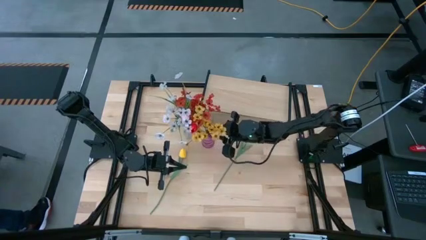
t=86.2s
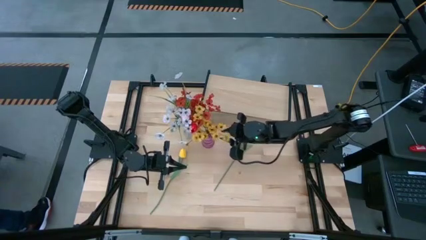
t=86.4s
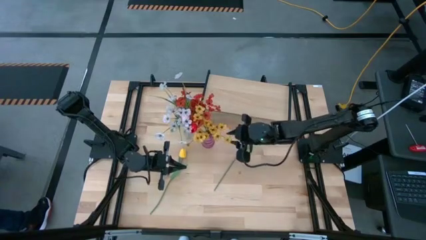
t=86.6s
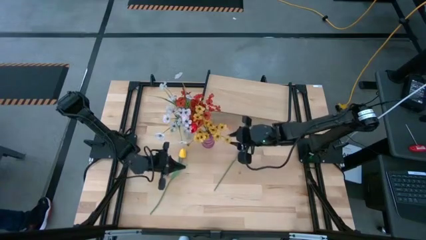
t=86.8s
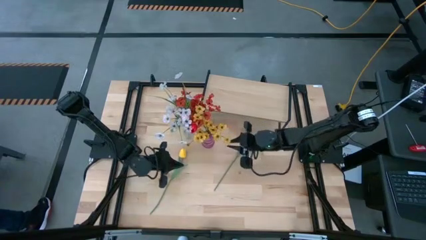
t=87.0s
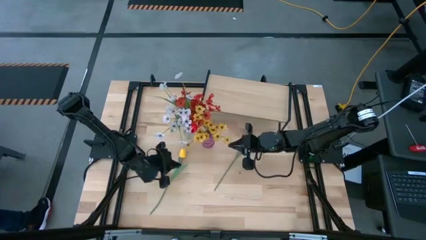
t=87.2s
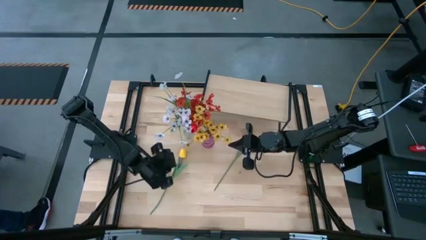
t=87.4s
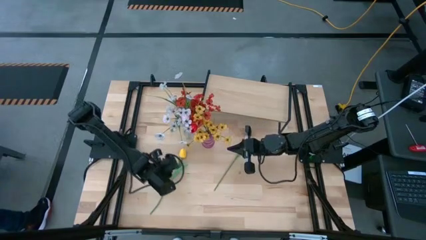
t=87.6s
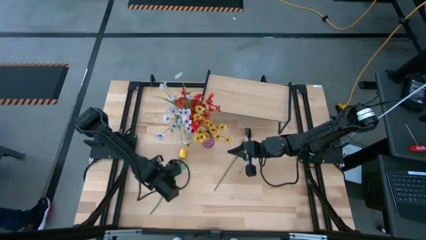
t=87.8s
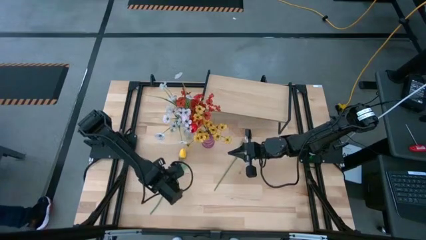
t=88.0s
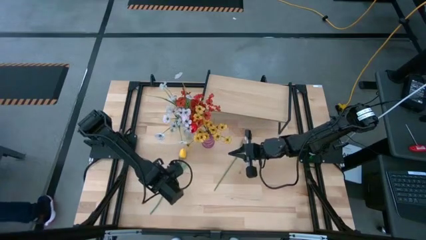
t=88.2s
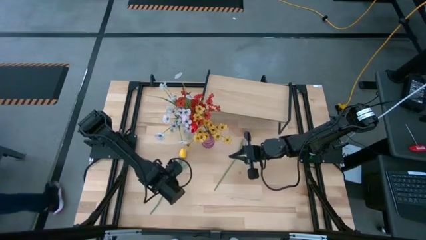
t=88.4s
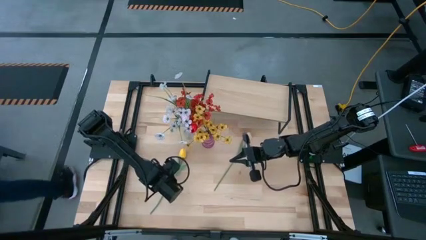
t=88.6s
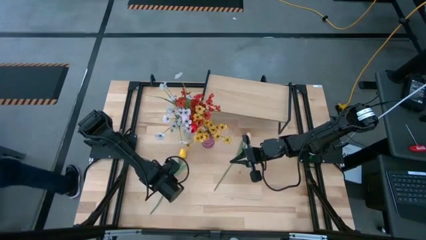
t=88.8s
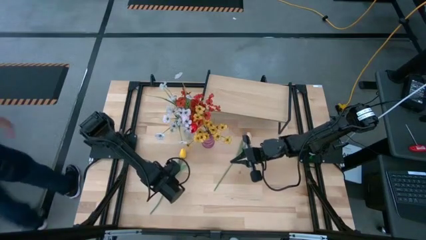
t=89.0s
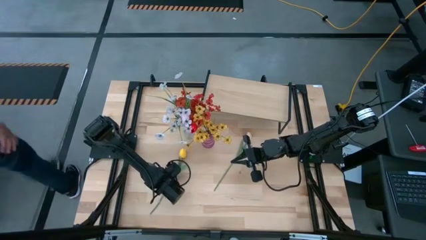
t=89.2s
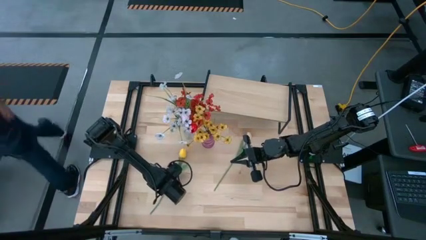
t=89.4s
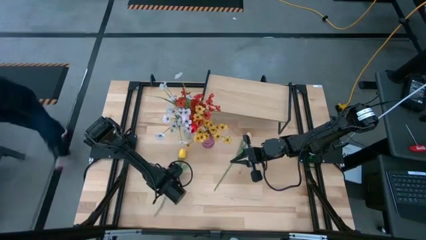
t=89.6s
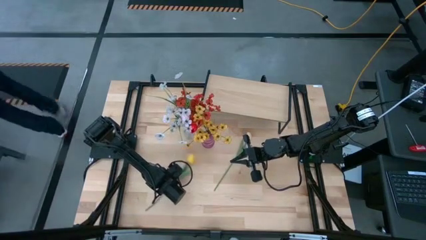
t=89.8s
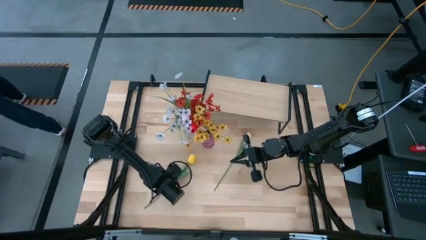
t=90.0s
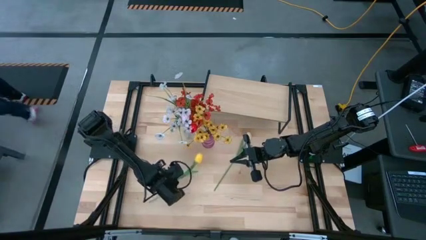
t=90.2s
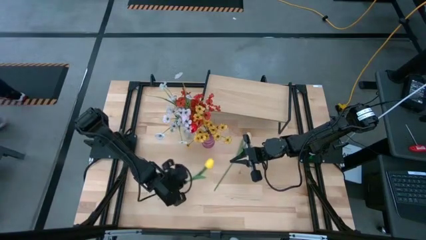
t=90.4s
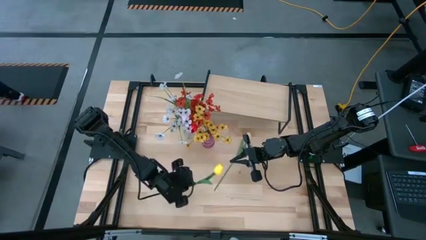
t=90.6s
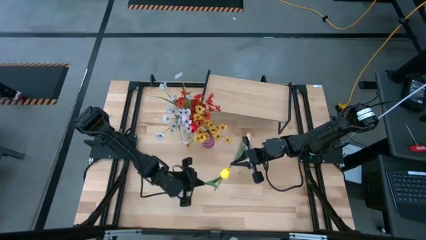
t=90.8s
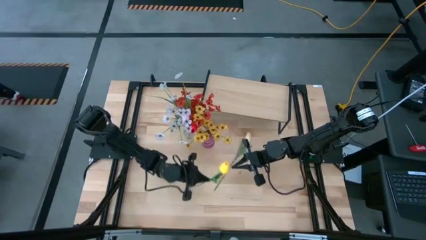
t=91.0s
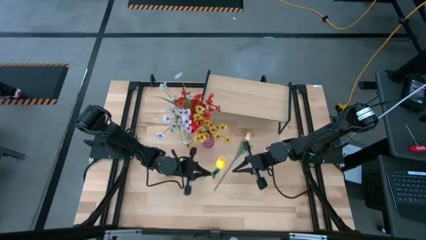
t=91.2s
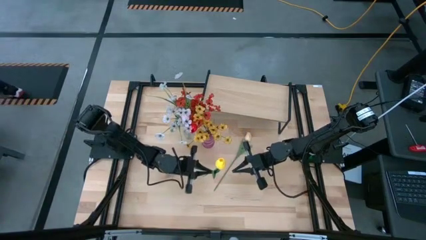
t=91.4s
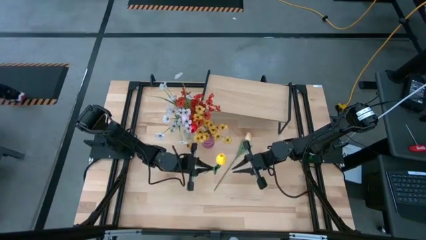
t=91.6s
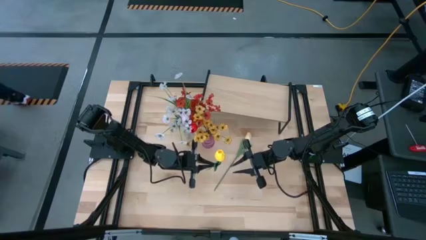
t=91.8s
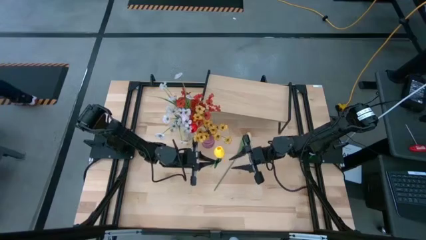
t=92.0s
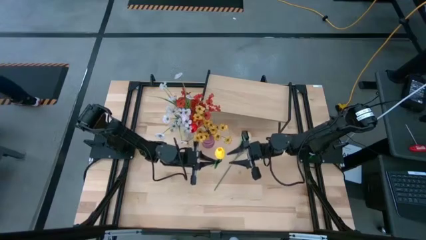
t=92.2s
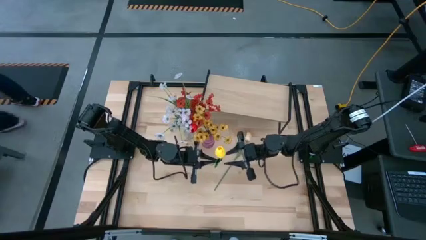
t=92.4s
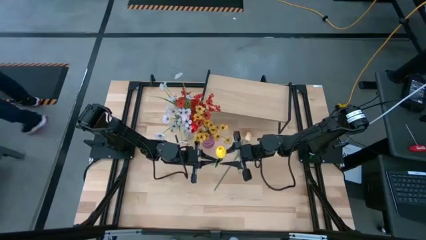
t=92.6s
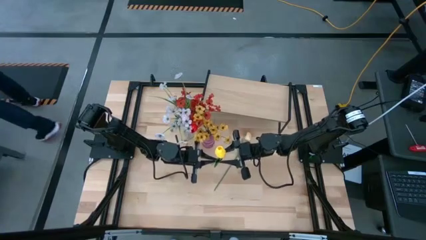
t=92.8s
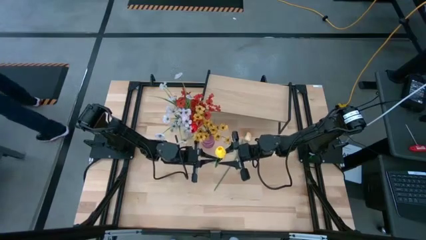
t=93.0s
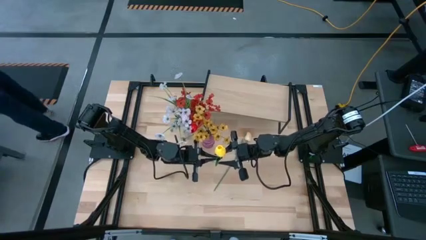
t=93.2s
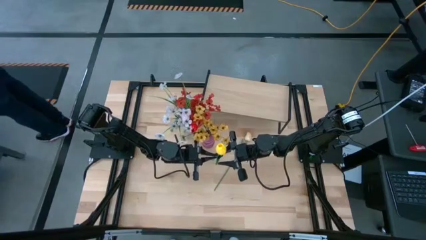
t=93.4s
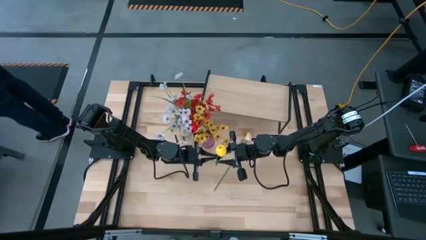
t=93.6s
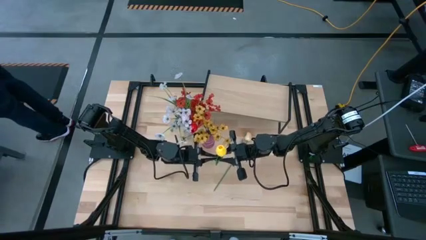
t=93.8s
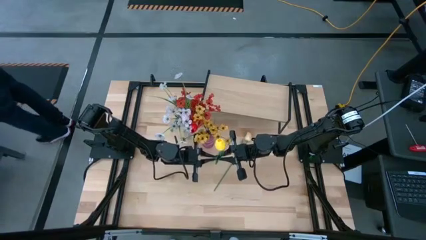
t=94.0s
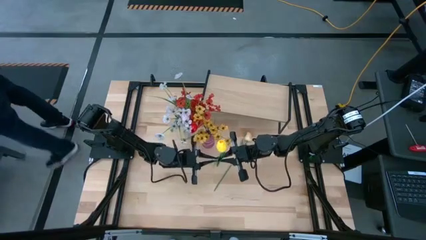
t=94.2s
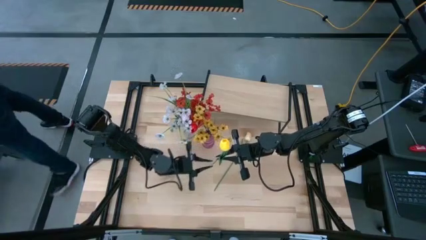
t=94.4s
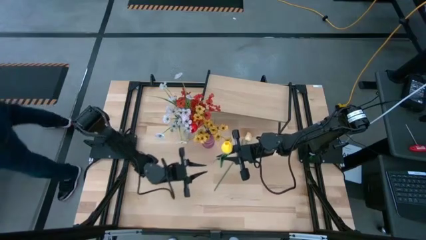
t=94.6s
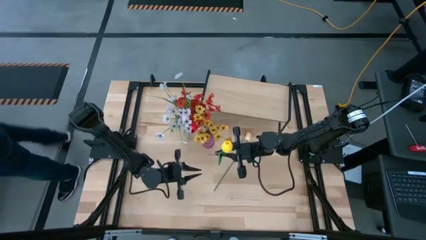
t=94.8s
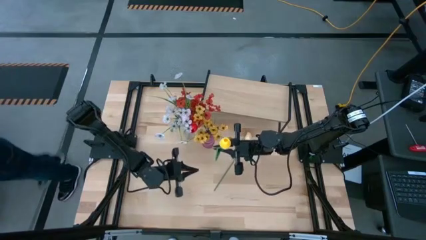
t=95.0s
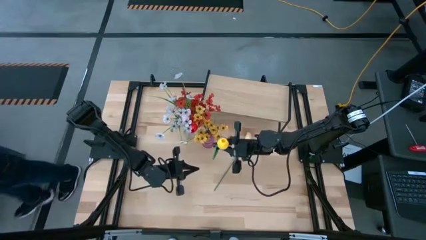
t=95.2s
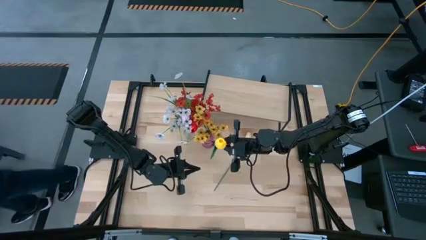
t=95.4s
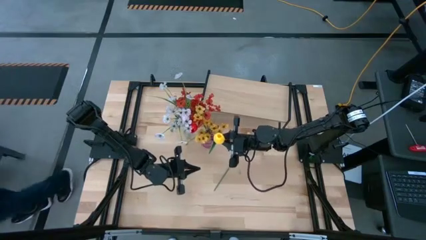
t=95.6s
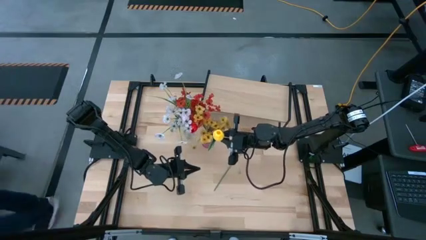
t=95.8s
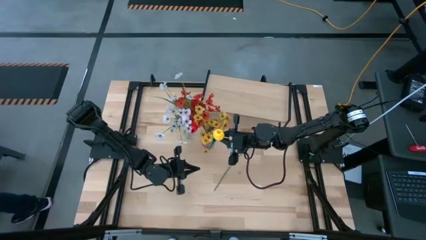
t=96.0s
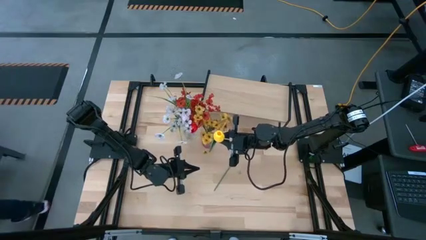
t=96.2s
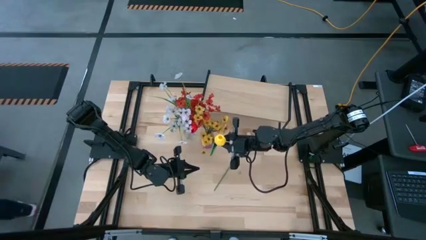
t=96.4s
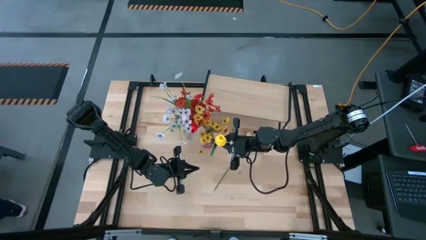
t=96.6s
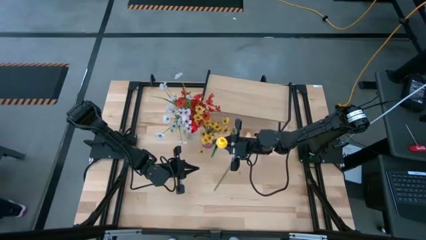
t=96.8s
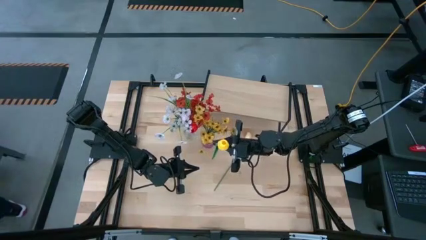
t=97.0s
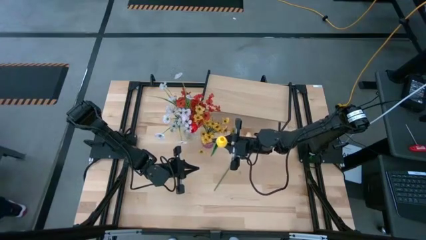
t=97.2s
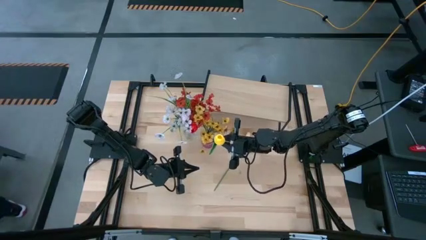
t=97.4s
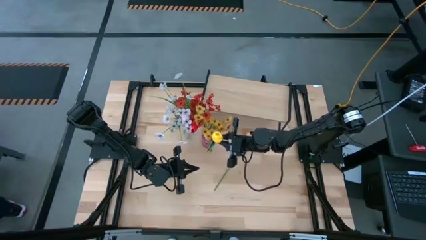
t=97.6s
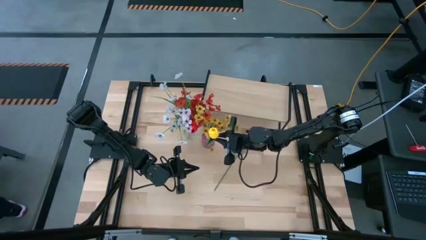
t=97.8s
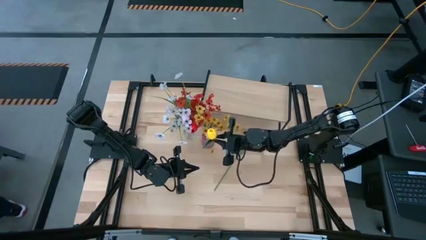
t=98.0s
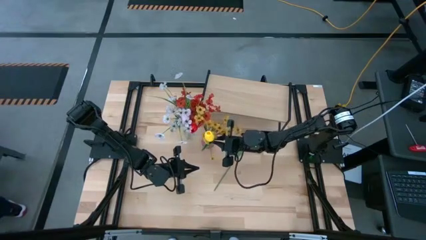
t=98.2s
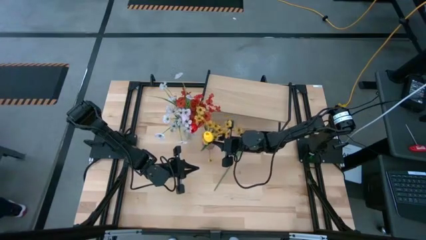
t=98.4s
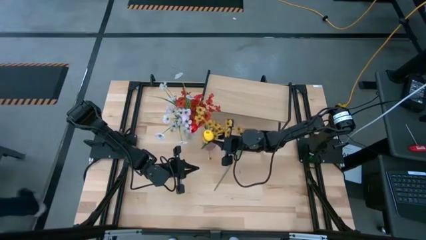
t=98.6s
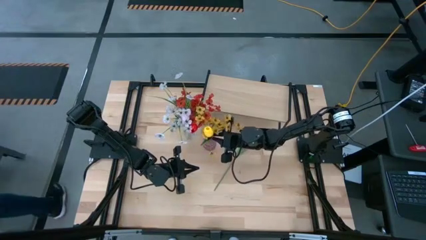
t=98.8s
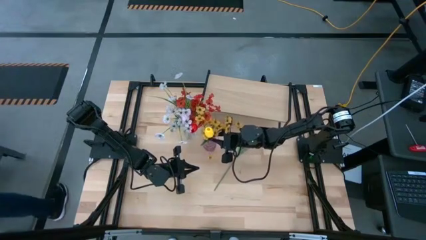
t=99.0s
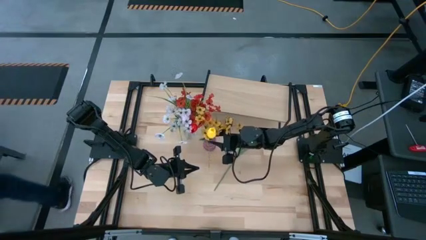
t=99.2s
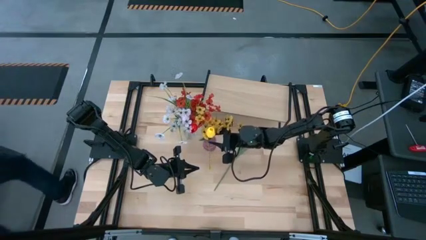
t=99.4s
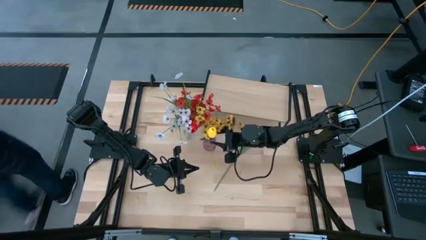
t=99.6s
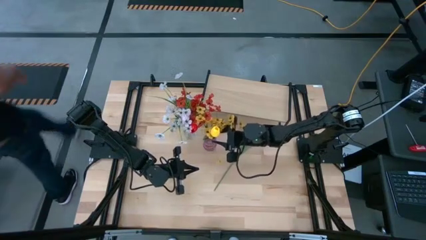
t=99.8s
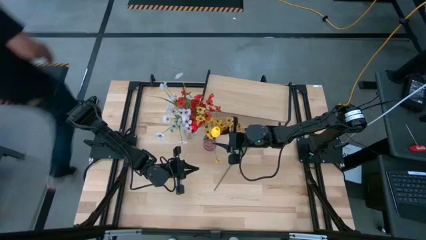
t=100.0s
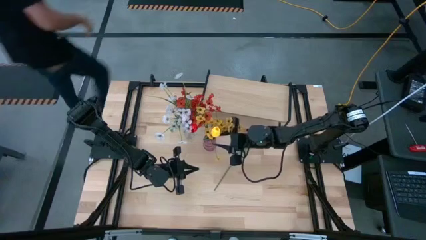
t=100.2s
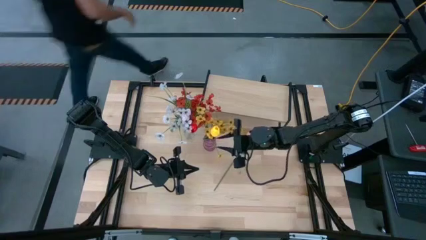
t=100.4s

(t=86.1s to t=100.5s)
Task: Pick and place flowers into a vace then onto a shelf
Put the yellow flower into the violet vase
